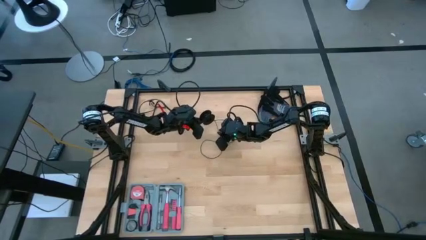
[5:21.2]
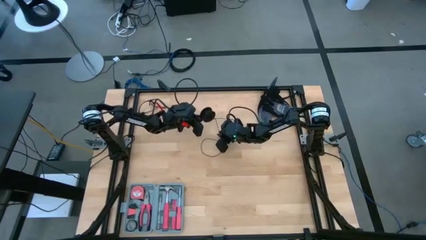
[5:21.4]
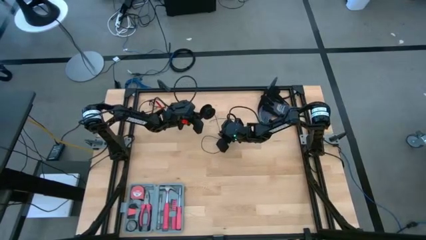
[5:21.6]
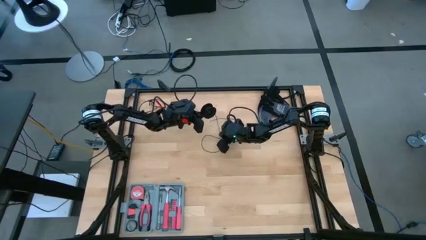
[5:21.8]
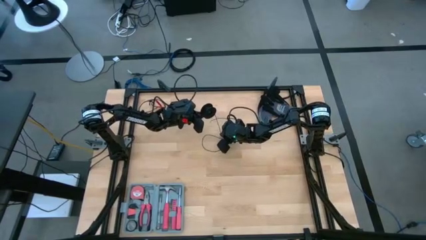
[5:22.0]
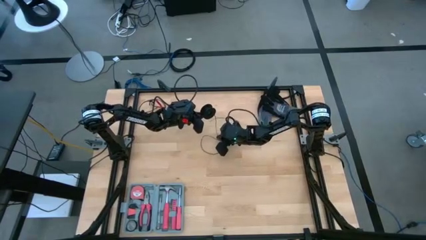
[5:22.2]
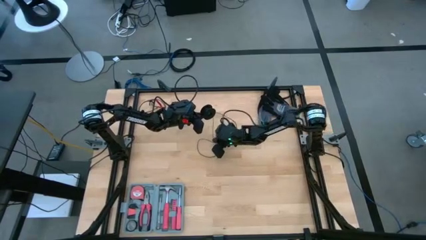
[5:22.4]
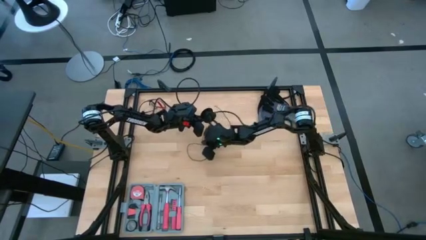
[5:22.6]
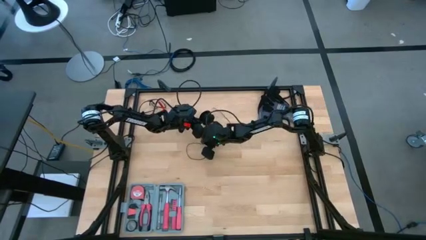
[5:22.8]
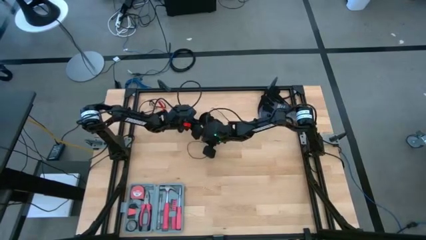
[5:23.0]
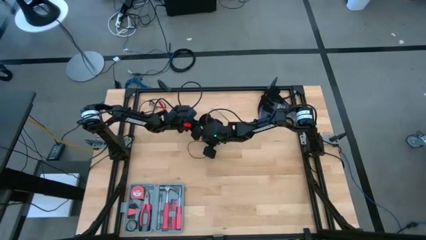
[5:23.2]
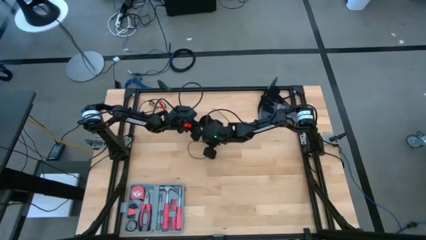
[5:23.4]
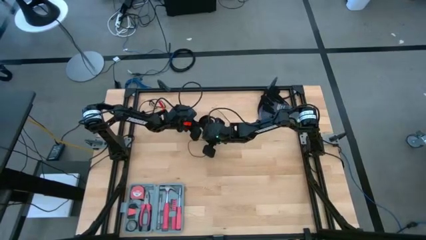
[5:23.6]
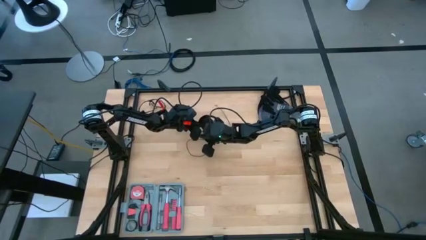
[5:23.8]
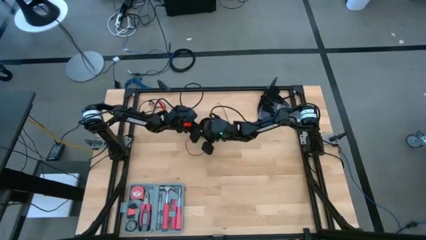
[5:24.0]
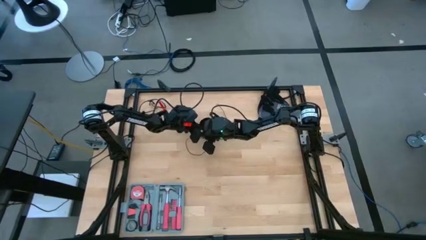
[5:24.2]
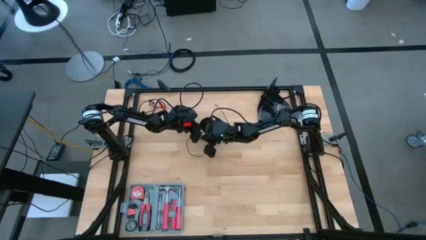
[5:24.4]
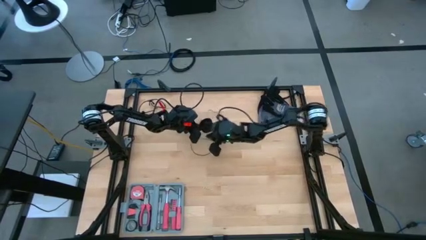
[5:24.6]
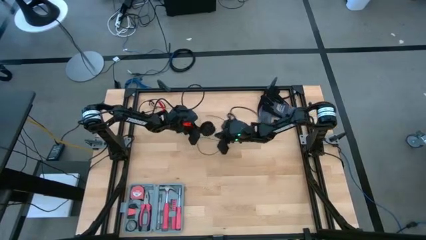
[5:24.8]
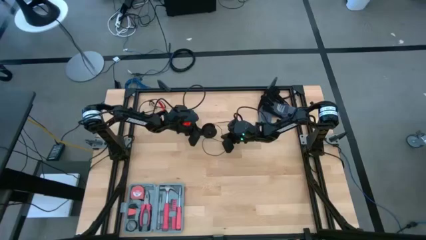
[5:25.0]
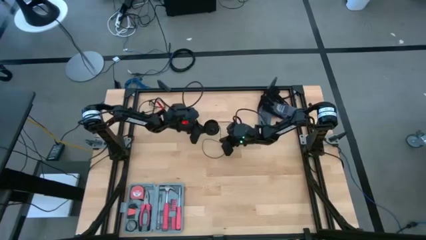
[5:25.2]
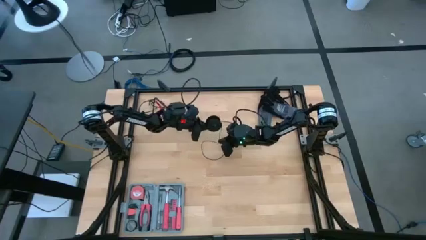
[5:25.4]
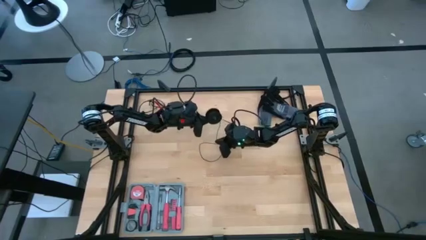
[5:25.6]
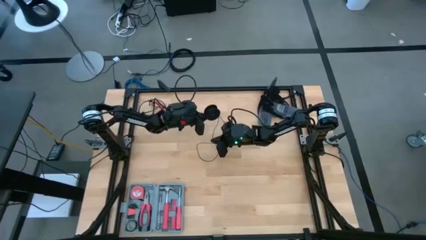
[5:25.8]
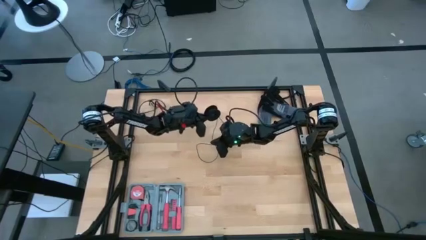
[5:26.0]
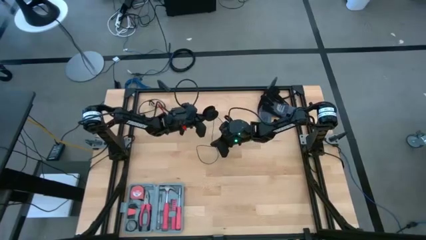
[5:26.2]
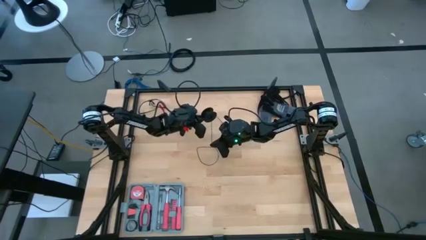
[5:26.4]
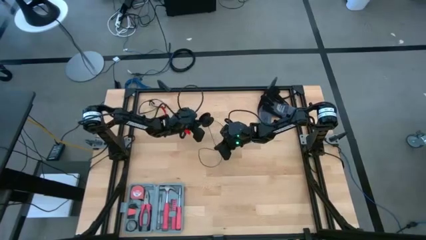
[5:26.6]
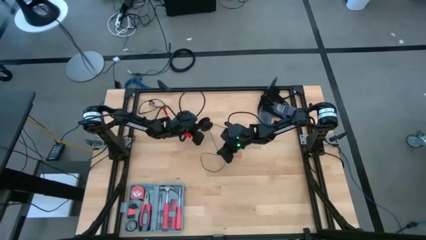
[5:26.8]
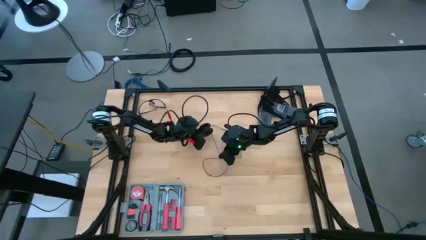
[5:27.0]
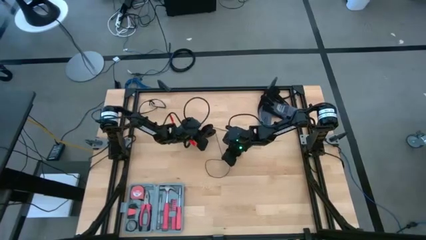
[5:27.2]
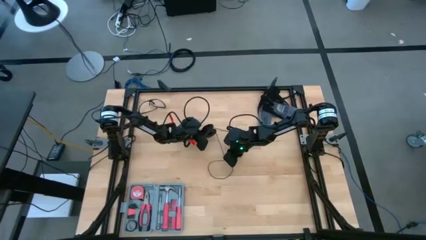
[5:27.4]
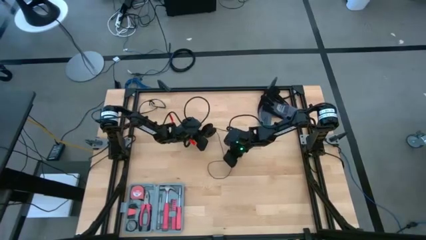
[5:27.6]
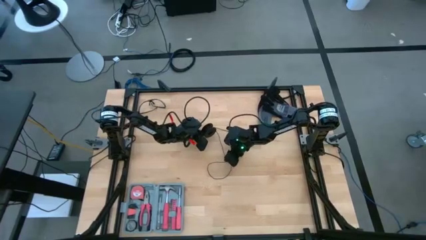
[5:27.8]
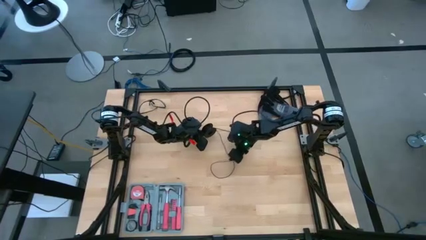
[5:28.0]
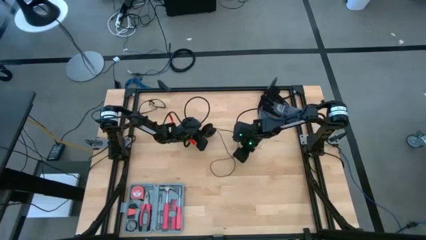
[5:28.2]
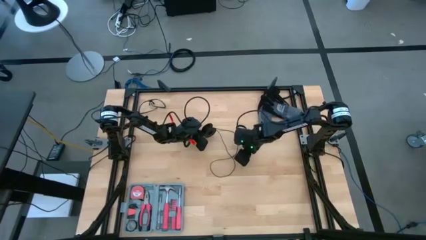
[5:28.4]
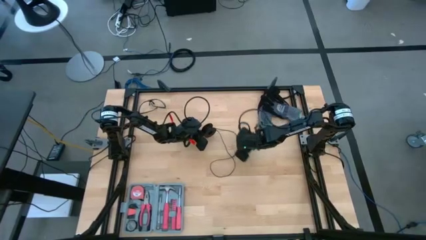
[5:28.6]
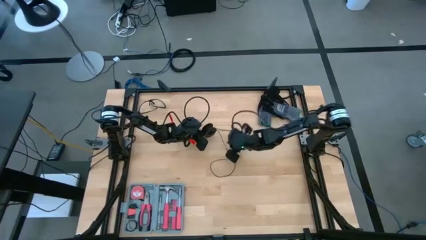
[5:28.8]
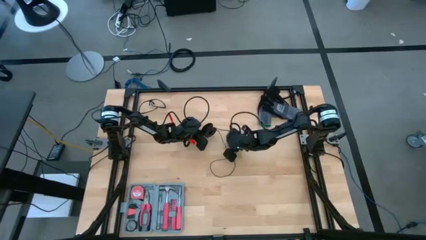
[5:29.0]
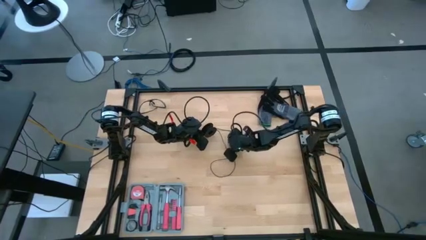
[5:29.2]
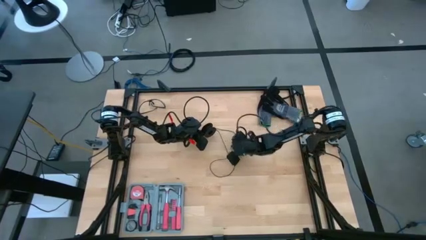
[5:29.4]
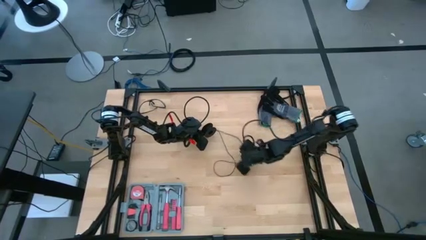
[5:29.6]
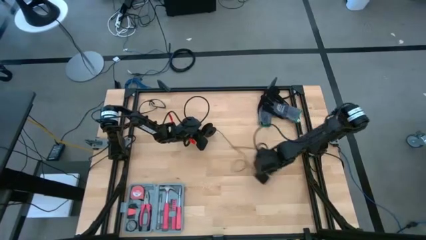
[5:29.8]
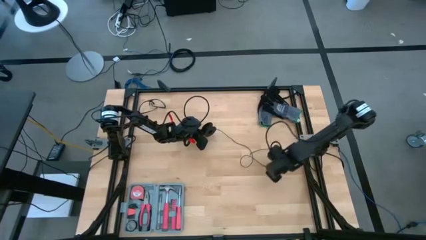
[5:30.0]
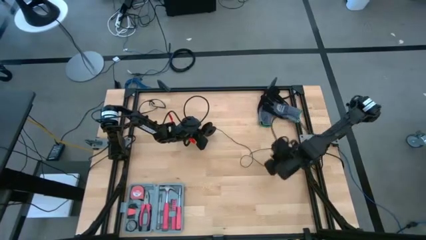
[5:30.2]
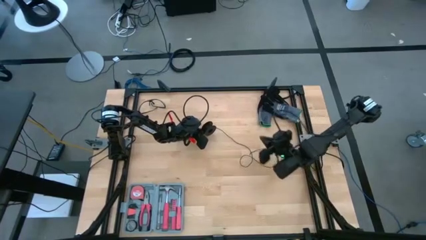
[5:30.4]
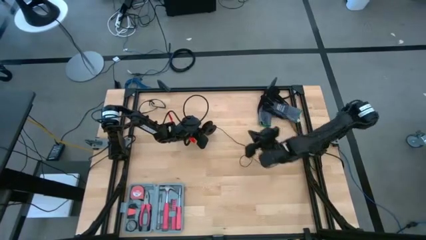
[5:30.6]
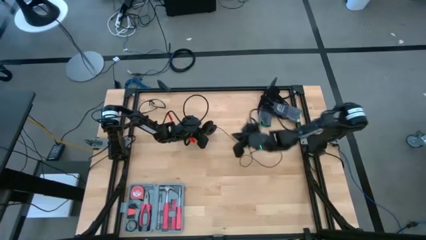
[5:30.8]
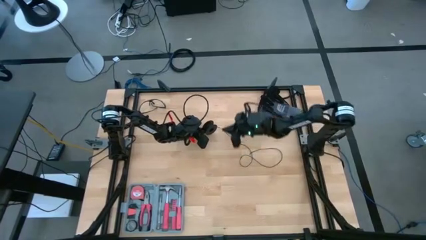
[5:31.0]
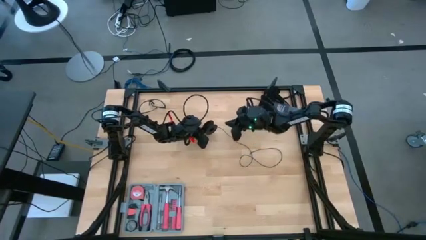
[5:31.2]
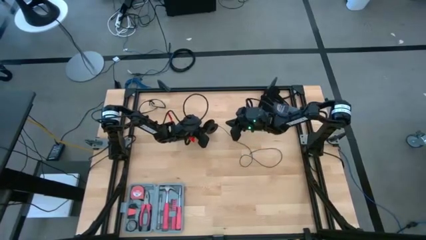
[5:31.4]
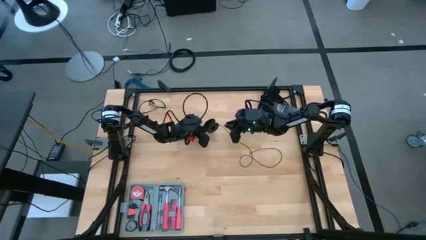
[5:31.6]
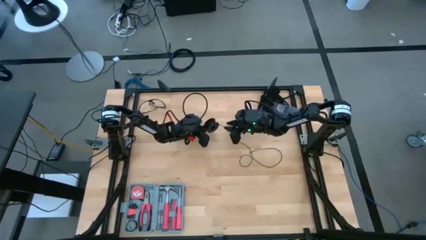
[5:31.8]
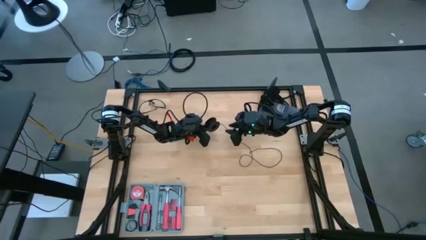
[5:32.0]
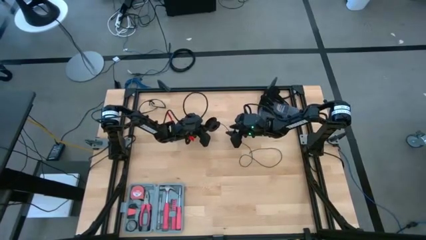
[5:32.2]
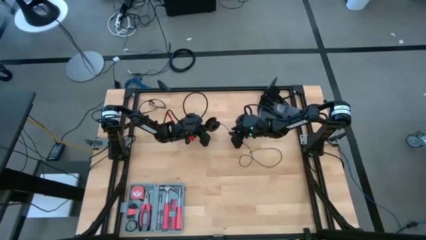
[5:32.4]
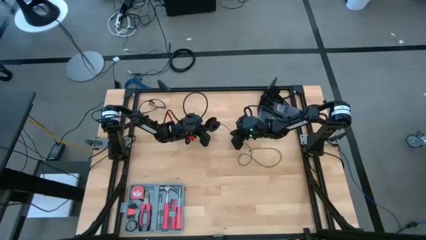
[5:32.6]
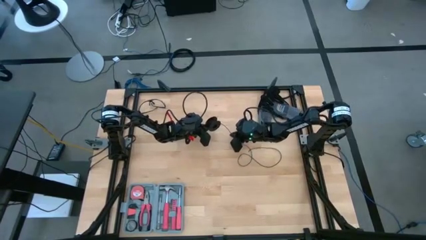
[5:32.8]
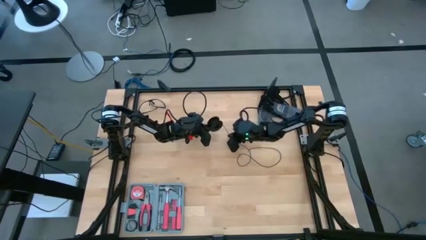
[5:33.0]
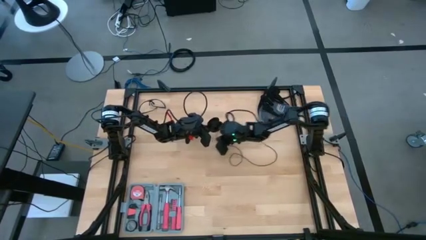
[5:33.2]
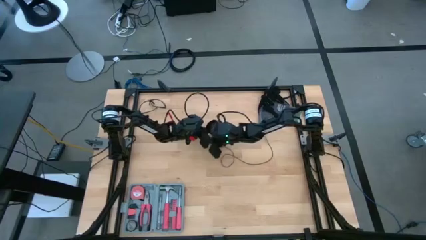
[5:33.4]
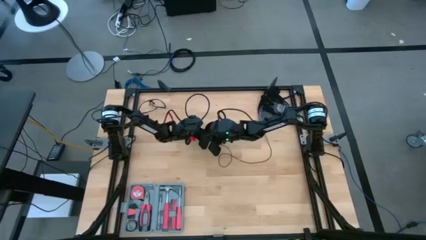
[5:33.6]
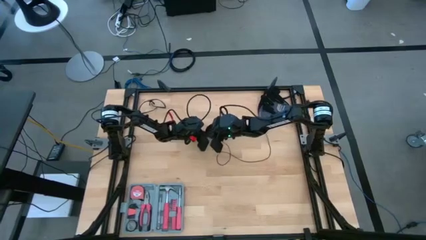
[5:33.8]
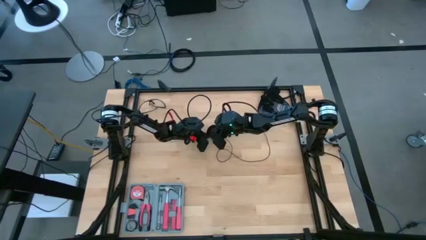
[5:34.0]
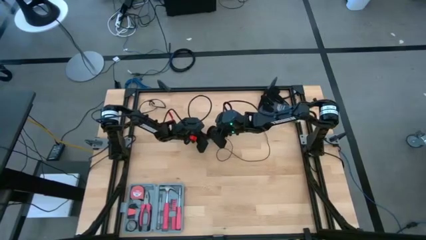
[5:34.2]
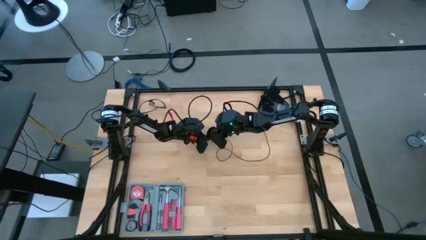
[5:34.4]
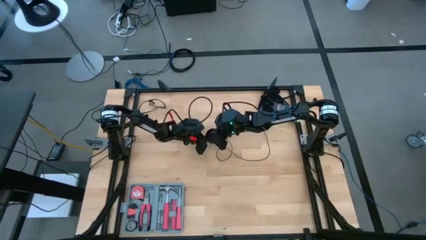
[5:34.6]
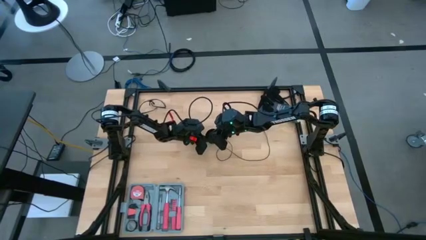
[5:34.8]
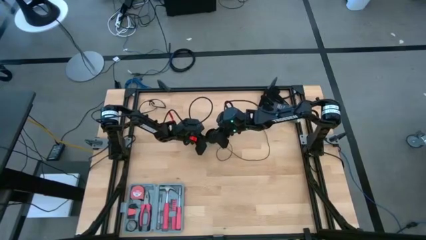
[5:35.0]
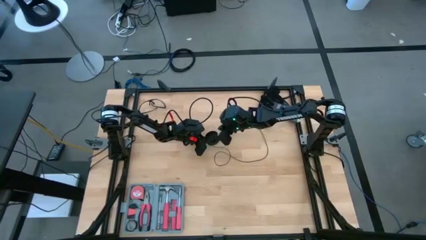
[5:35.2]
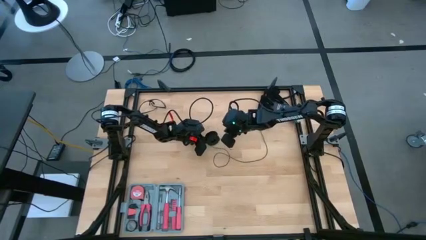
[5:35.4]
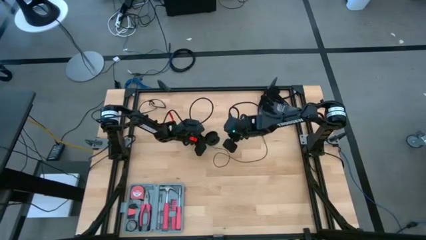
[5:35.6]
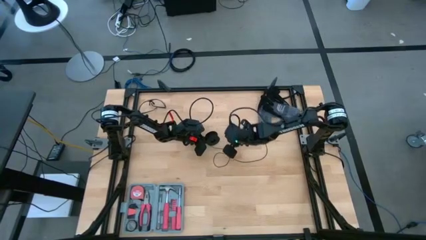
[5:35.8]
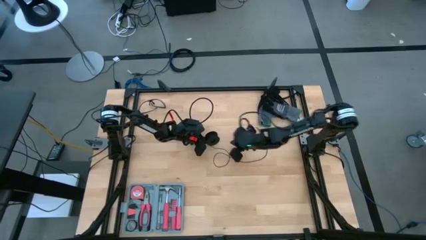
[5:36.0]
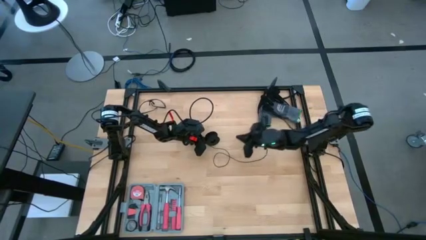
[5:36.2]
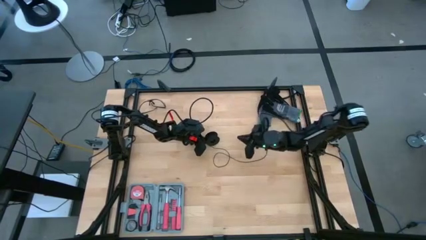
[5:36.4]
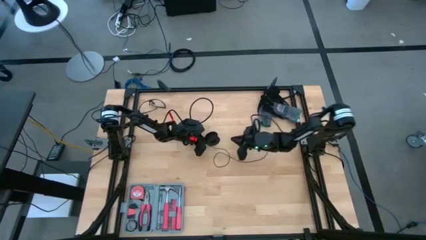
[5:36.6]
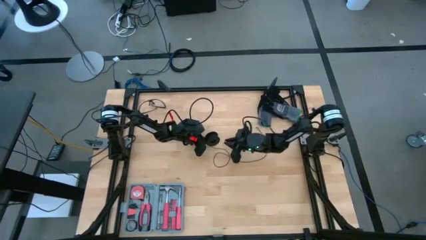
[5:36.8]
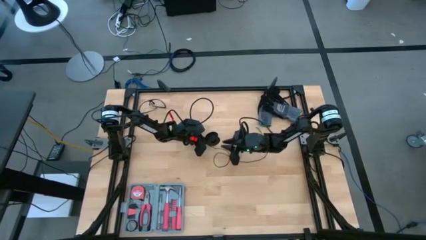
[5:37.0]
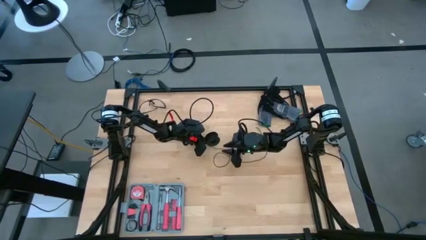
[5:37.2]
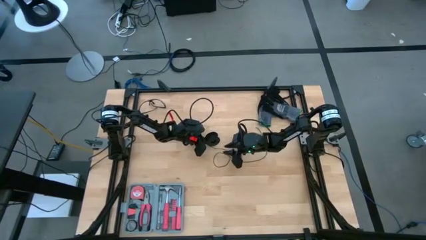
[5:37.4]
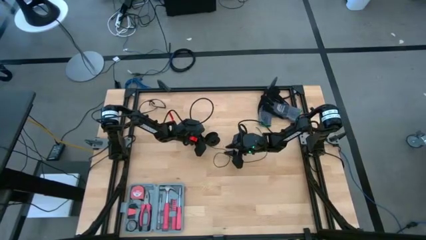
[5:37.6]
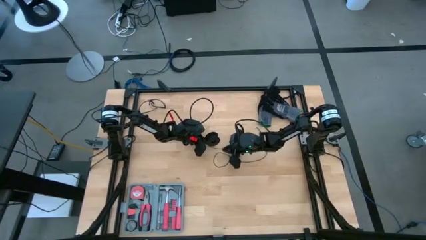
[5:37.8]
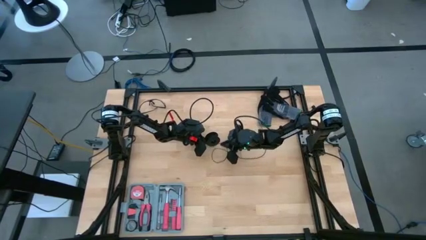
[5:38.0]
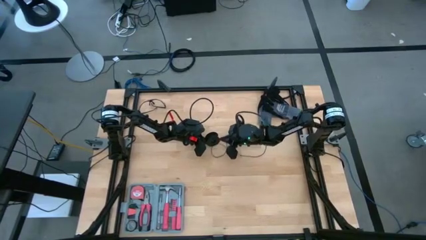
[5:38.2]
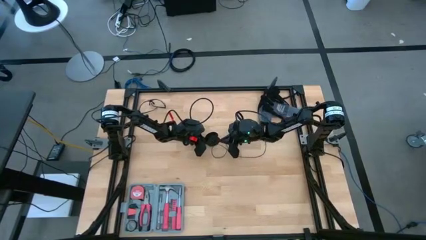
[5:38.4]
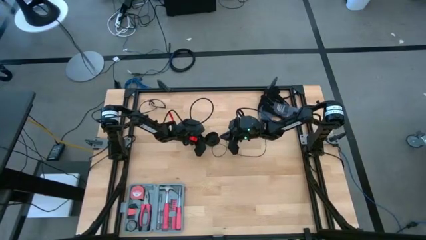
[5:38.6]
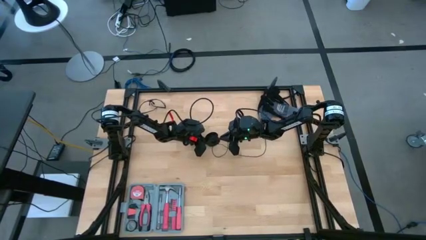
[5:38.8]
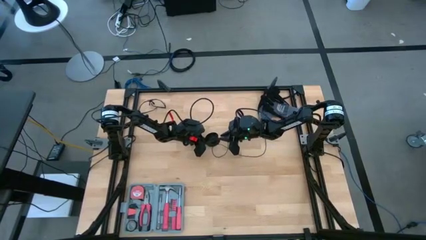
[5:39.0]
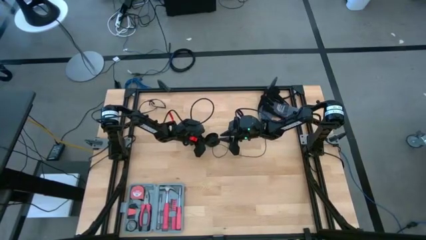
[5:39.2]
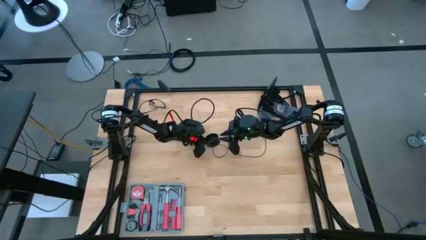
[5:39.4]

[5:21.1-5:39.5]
Task: Coil cords
Coil the black wire onto the black spool
